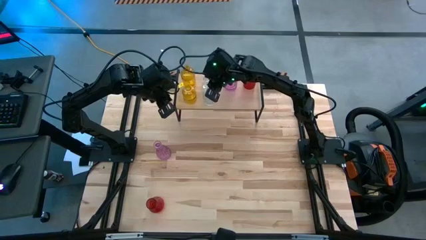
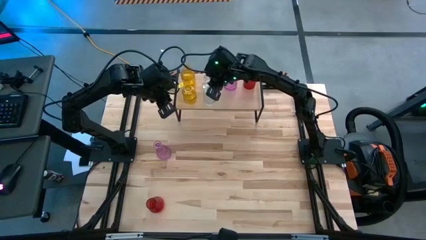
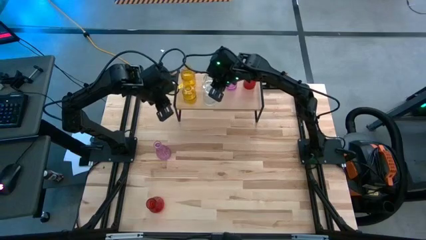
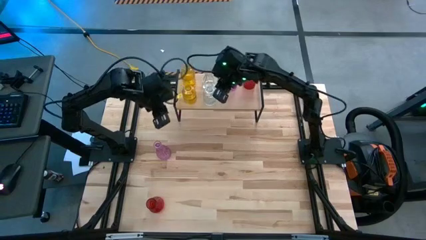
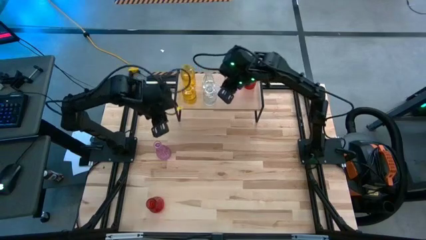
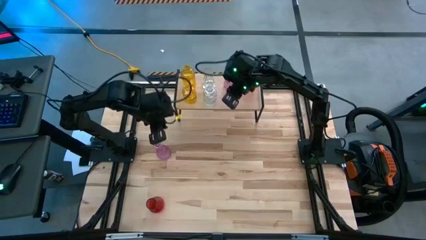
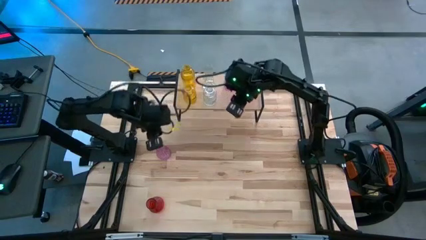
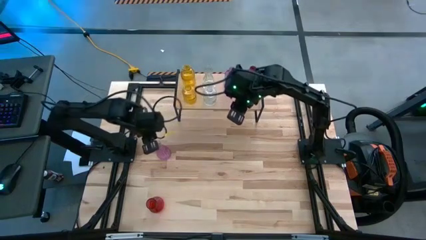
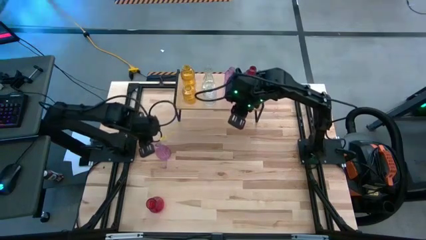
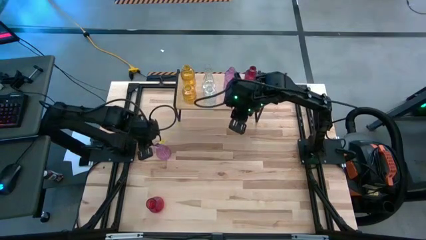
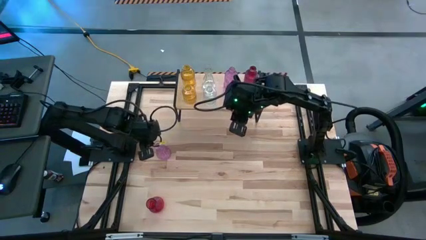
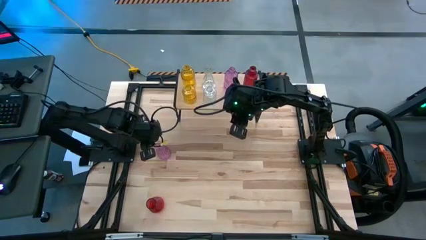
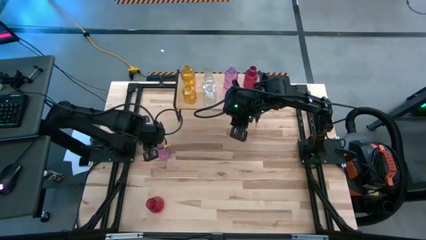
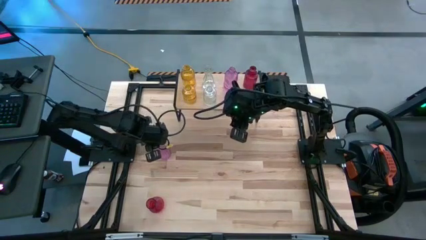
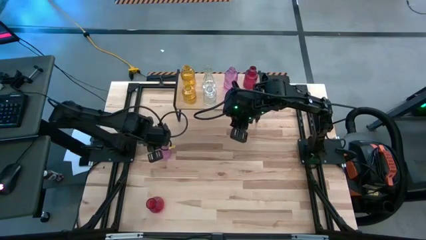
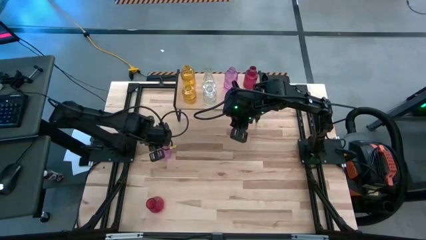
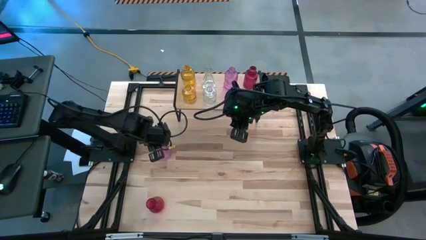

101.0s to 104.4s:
Task: sort vases onto shelf
Put the purple vase on the shelf aligned with the other purple vase

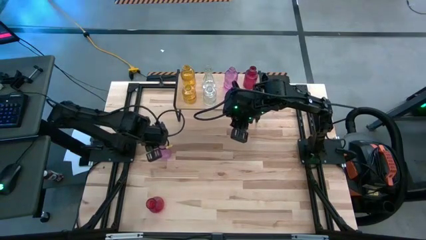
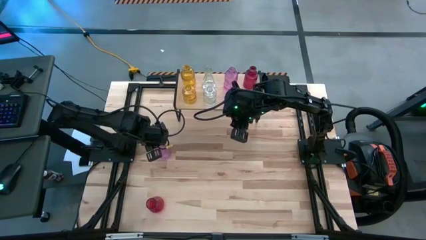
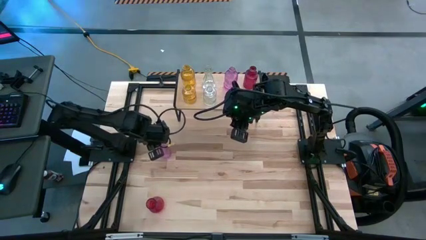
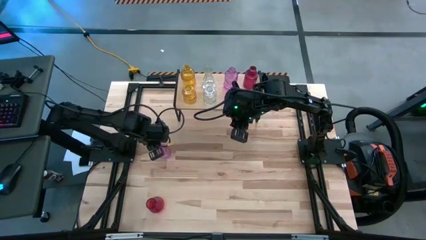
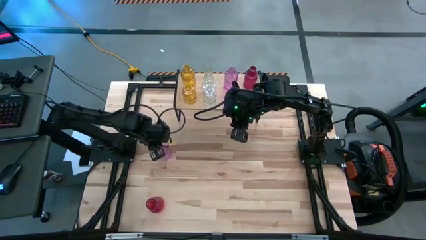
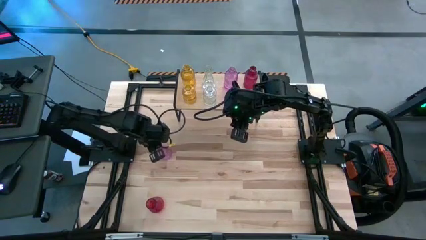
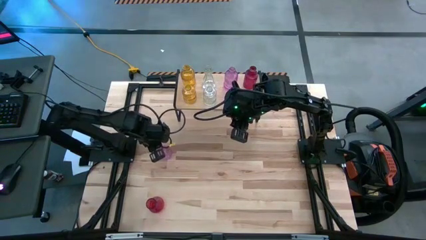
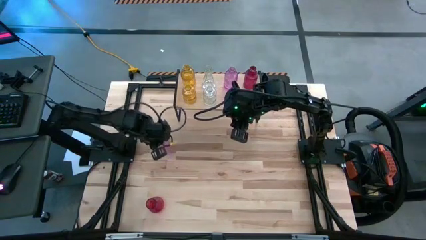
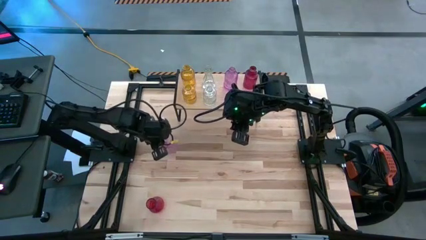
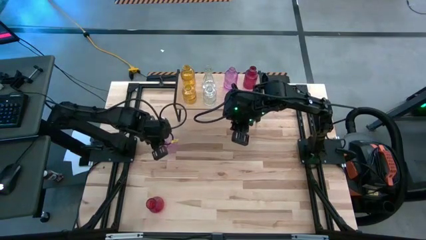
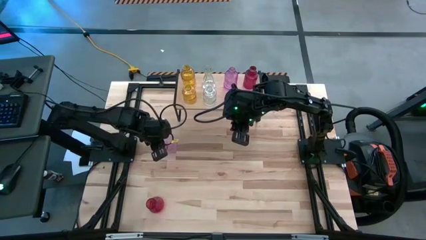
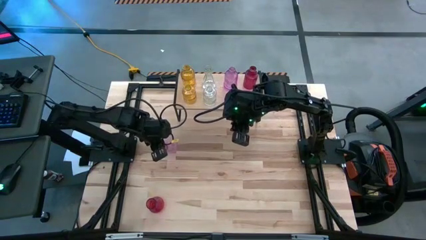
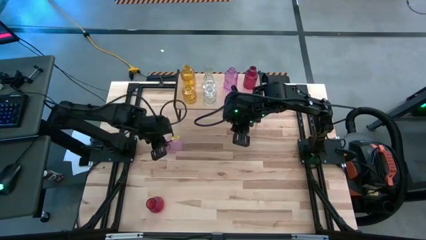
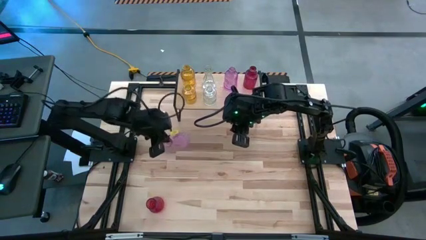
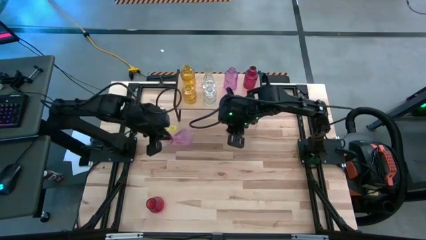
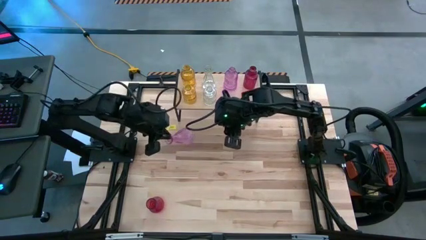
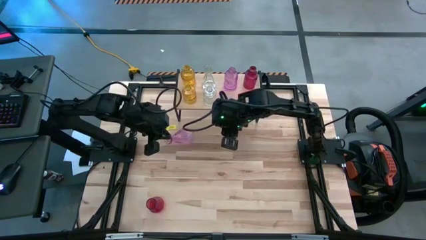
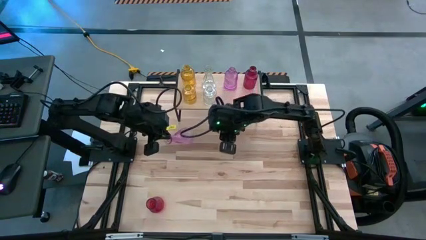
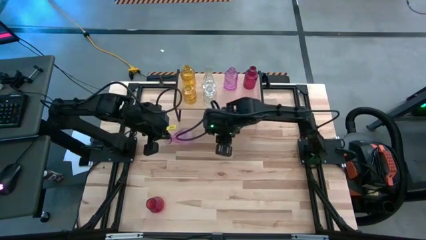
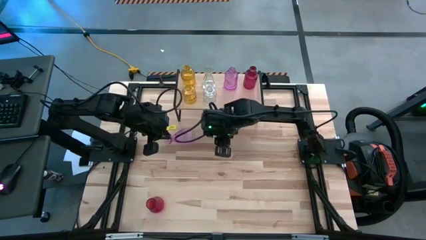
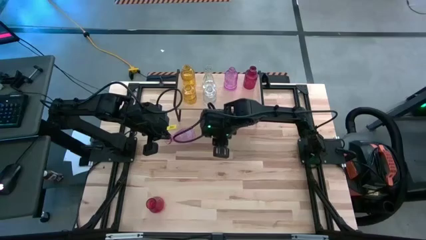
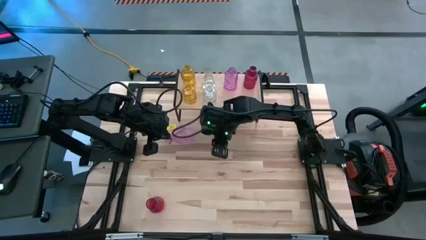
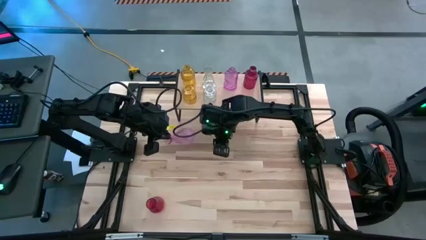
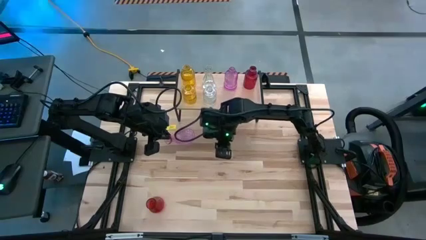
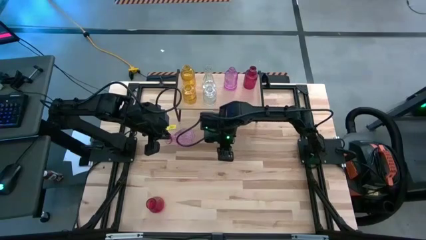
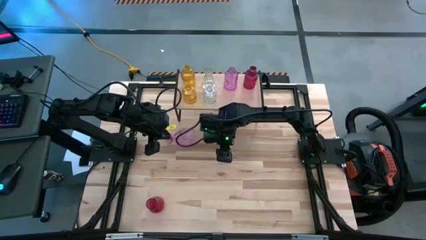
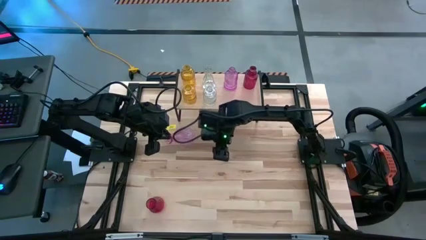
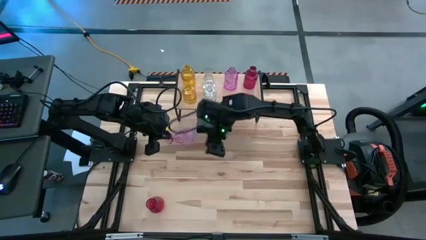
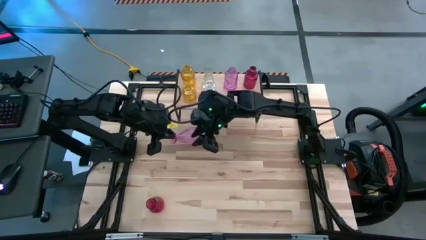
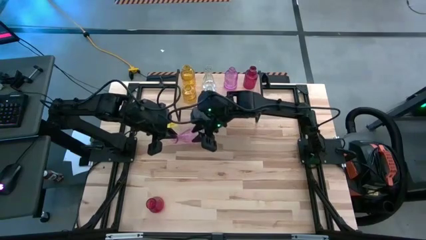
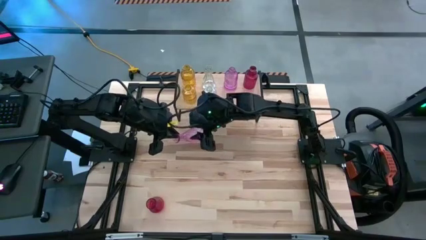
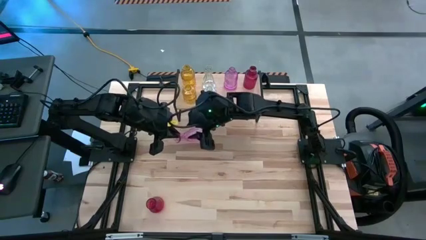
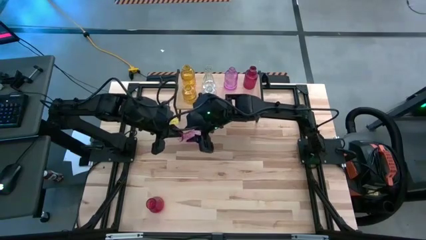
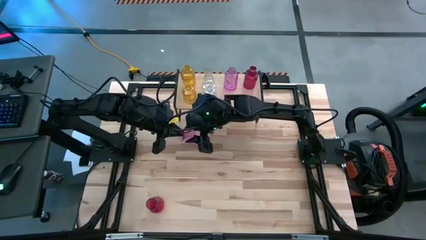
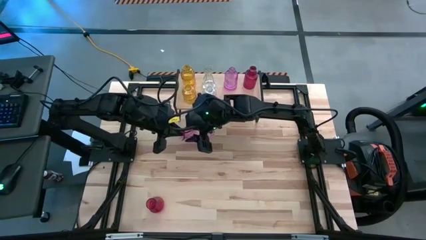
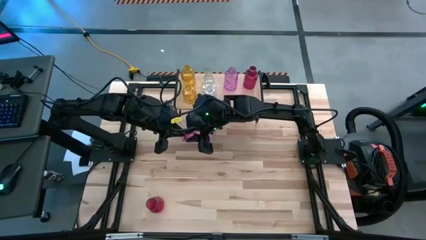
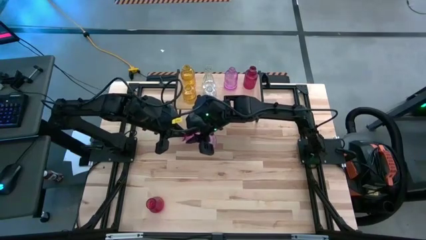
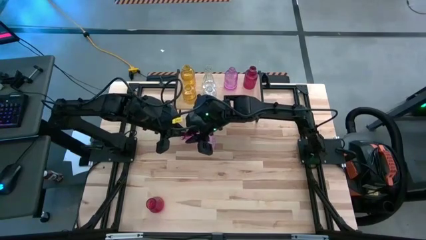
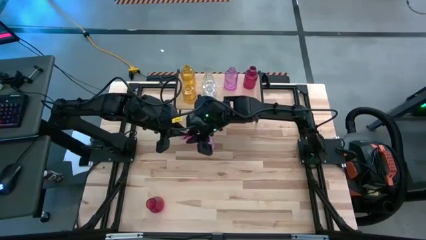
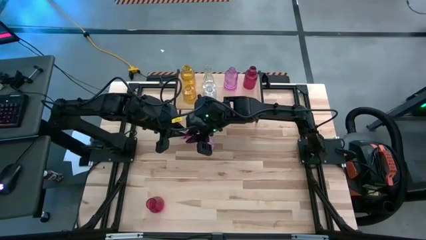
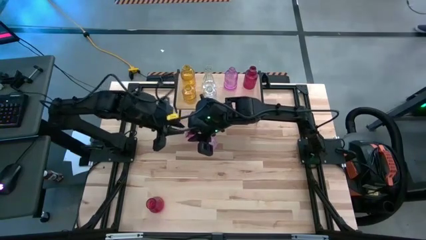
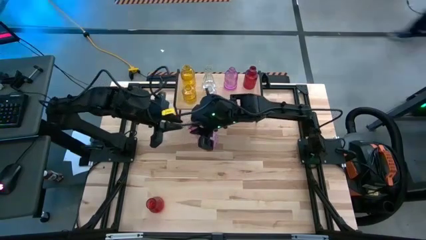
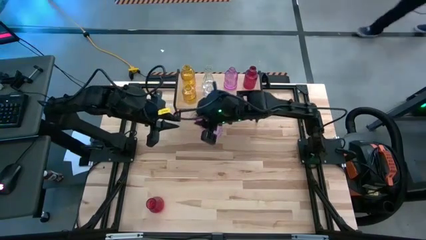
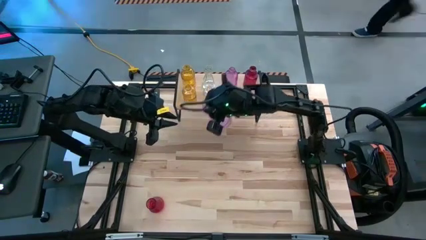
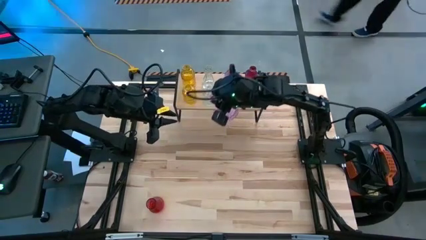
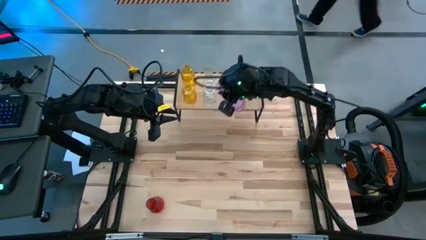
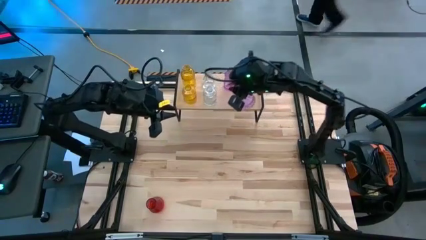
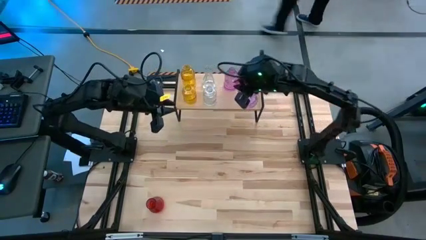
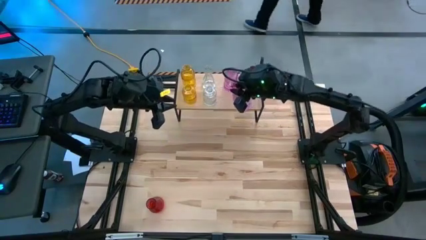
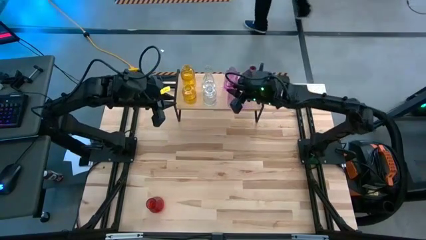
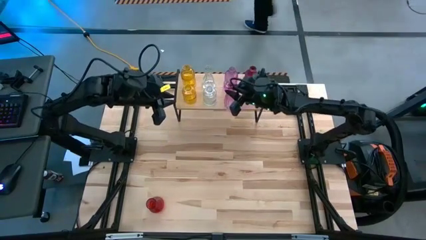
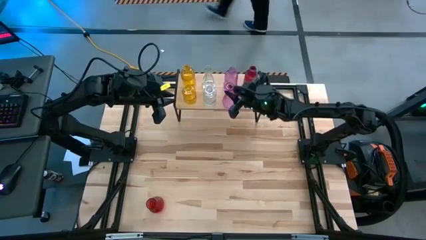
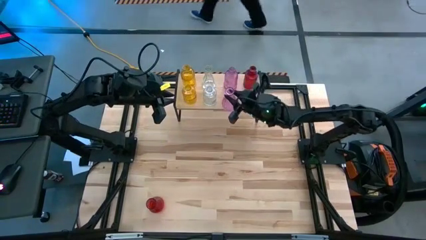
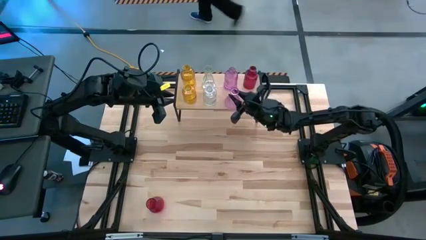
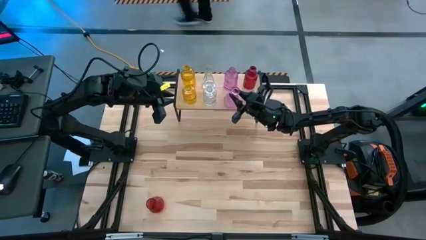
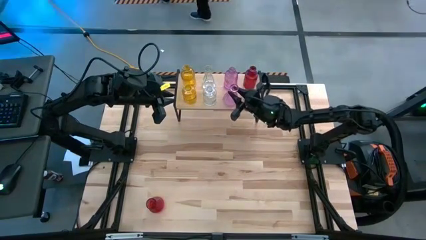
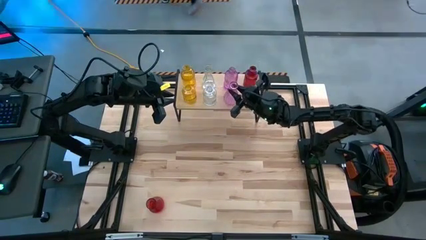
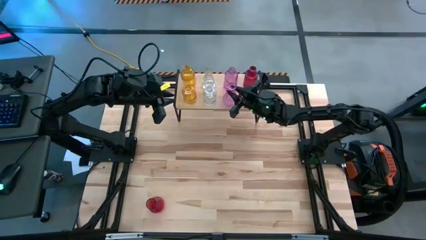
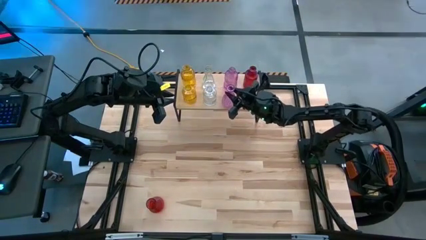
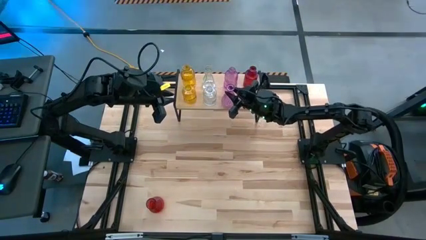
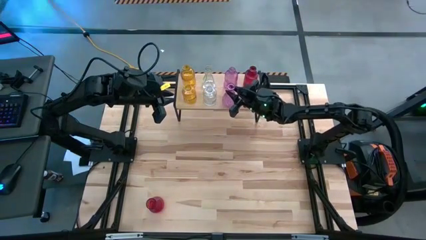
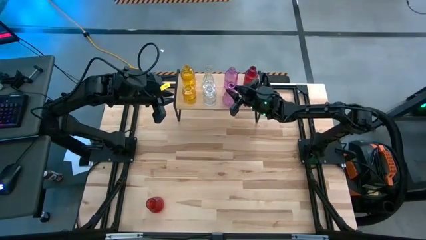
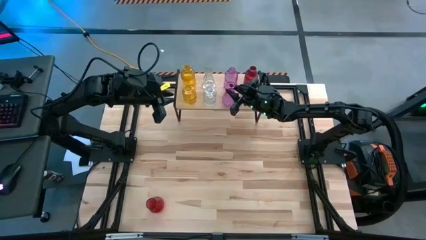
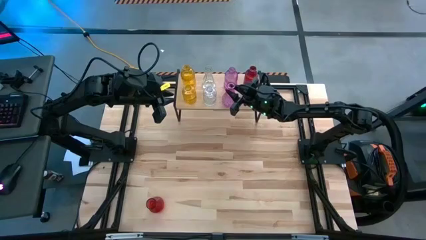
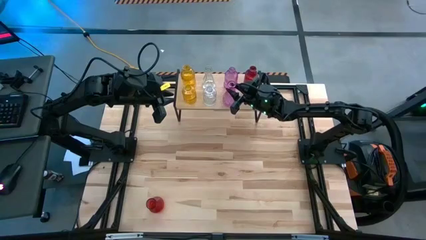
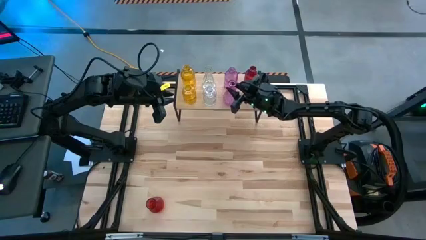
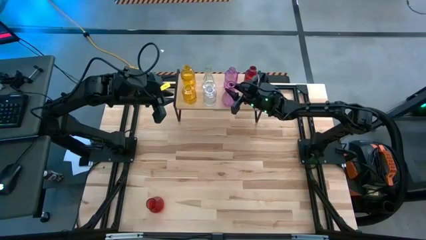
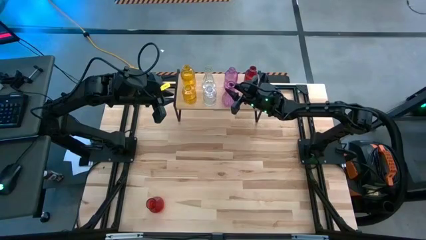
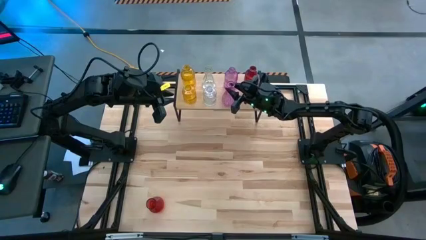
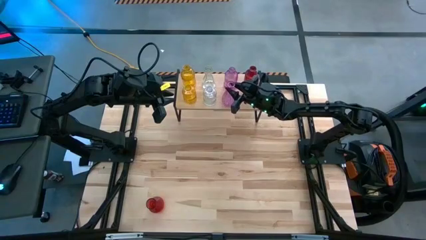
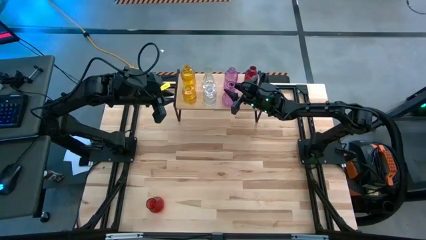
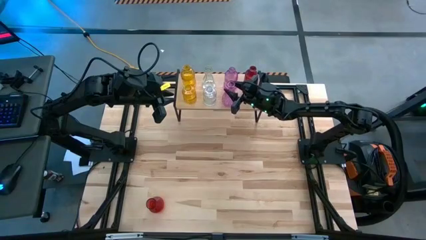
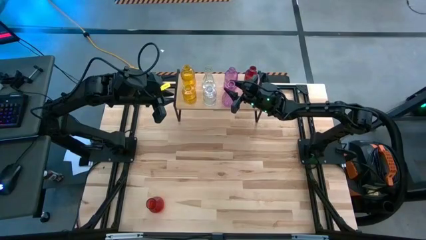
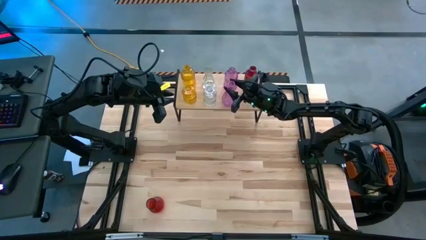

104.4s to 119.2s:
Put the purple vase on the shelf aligned with the other purple vase
